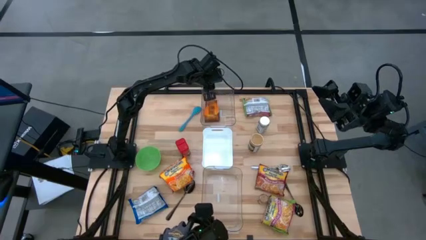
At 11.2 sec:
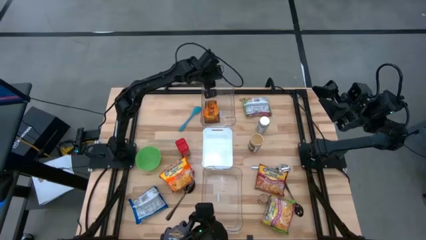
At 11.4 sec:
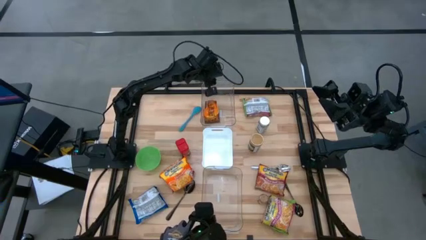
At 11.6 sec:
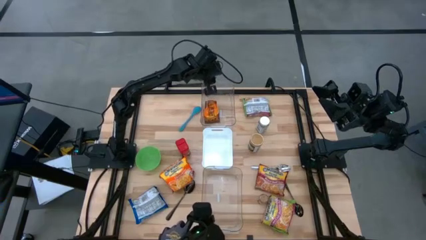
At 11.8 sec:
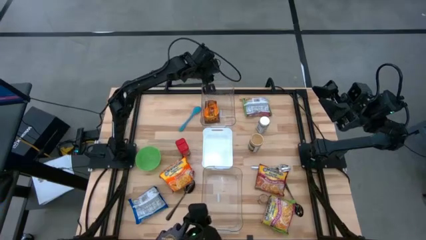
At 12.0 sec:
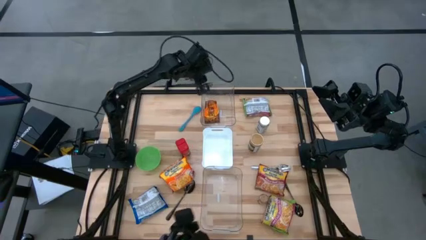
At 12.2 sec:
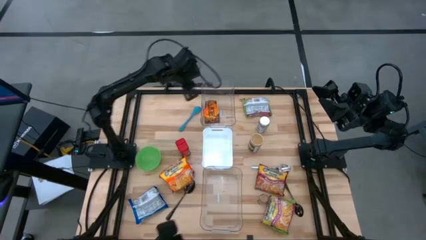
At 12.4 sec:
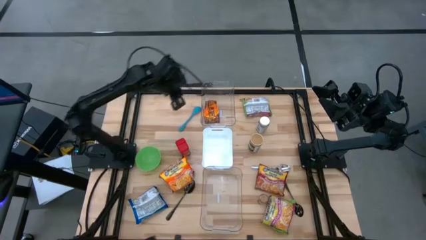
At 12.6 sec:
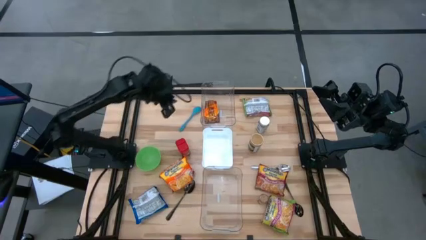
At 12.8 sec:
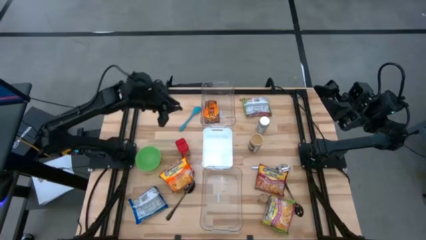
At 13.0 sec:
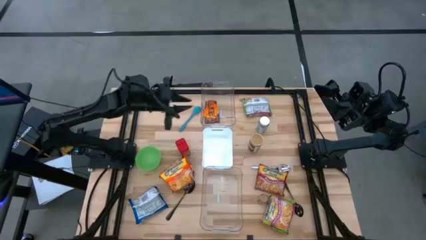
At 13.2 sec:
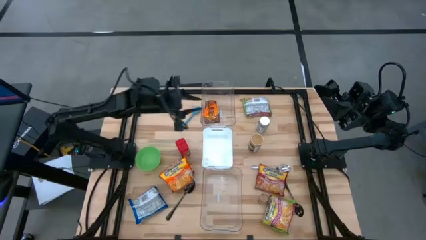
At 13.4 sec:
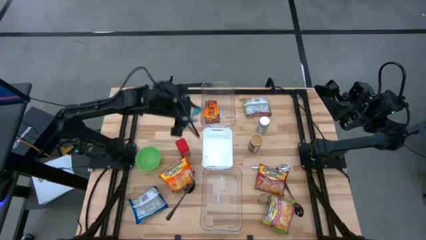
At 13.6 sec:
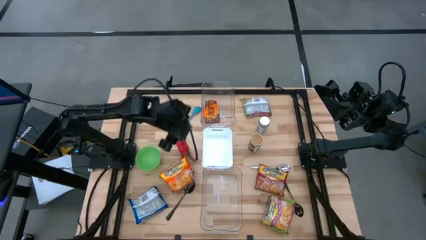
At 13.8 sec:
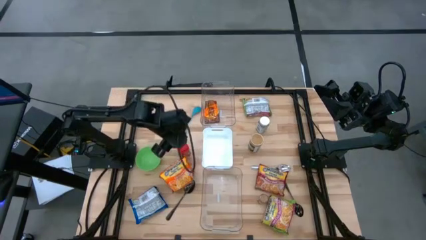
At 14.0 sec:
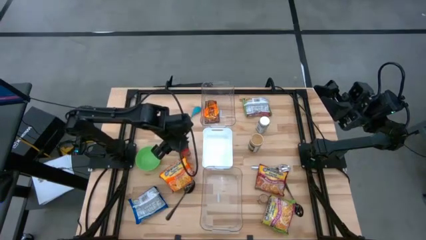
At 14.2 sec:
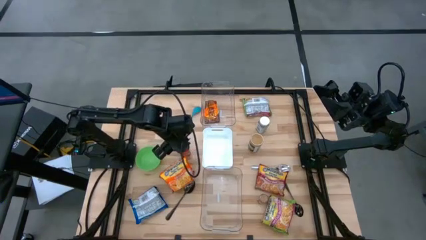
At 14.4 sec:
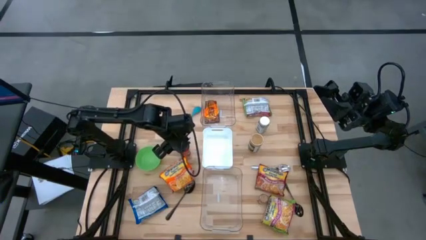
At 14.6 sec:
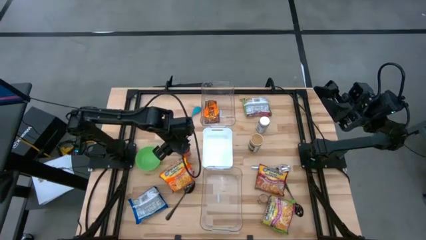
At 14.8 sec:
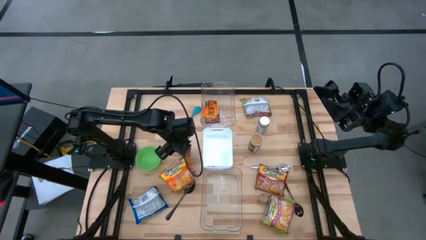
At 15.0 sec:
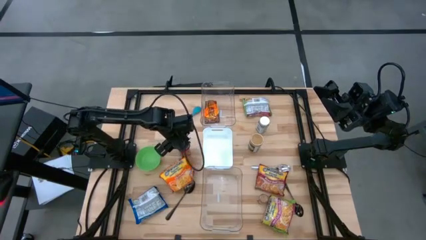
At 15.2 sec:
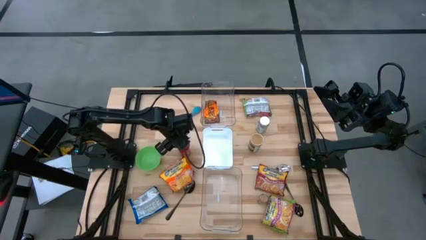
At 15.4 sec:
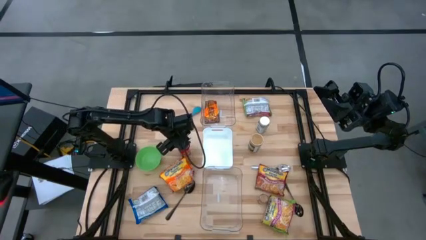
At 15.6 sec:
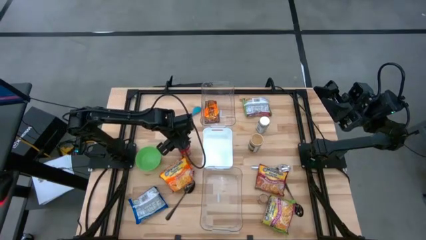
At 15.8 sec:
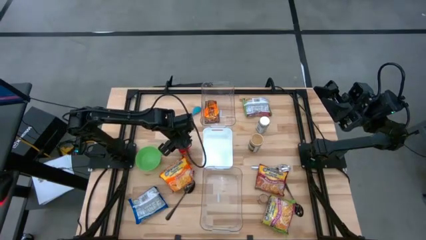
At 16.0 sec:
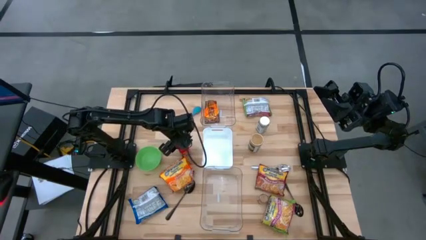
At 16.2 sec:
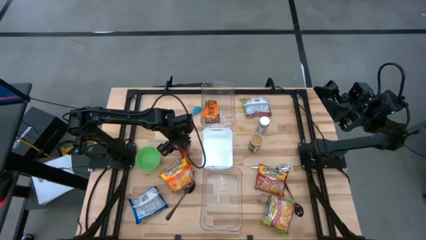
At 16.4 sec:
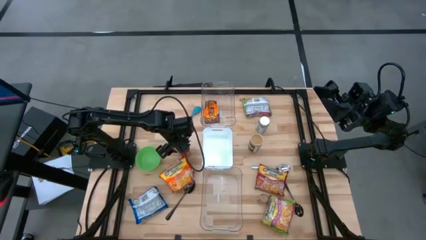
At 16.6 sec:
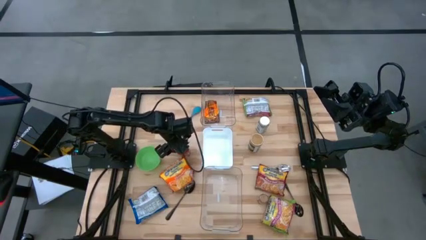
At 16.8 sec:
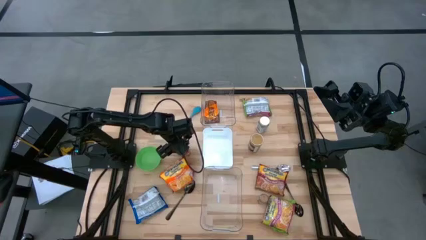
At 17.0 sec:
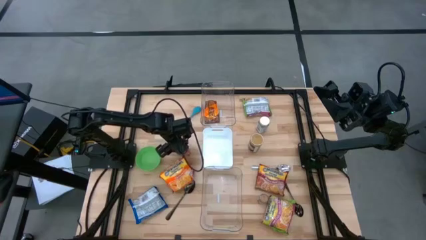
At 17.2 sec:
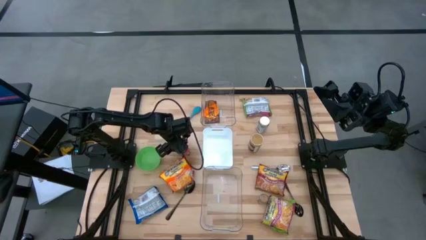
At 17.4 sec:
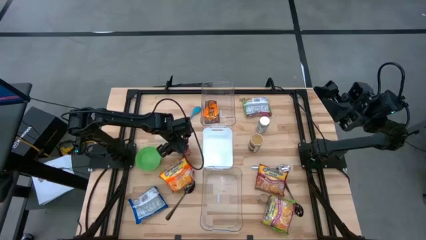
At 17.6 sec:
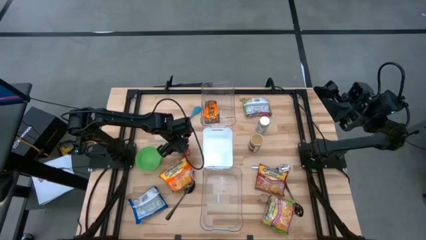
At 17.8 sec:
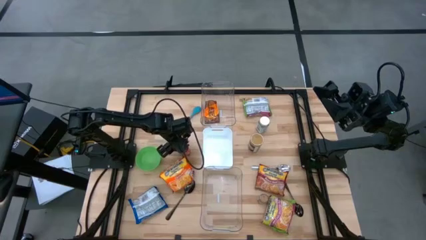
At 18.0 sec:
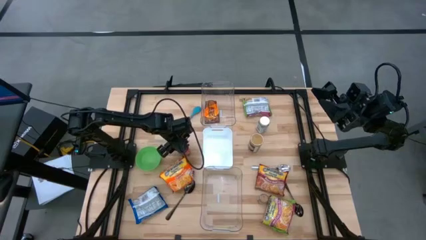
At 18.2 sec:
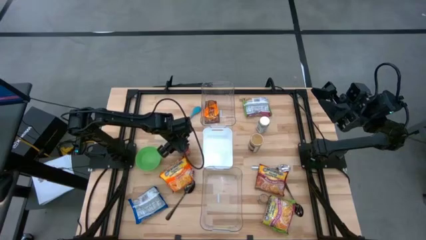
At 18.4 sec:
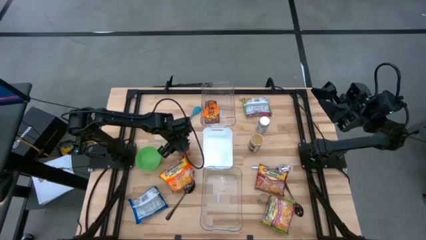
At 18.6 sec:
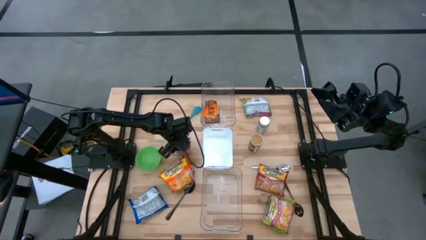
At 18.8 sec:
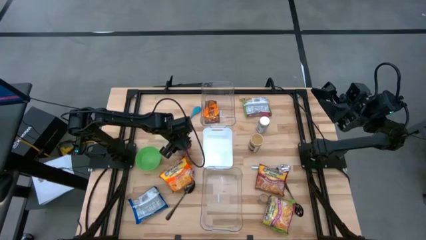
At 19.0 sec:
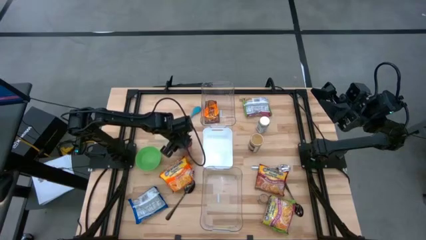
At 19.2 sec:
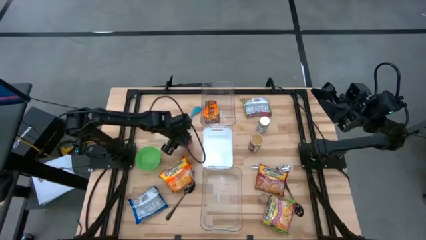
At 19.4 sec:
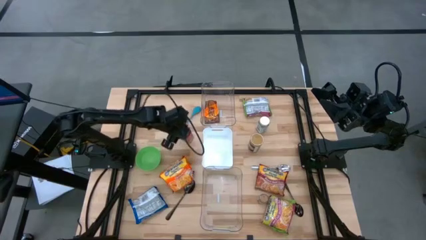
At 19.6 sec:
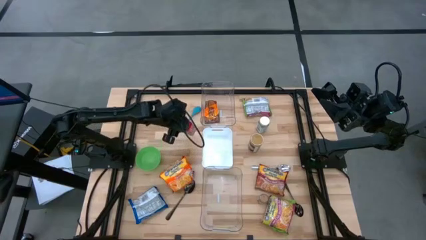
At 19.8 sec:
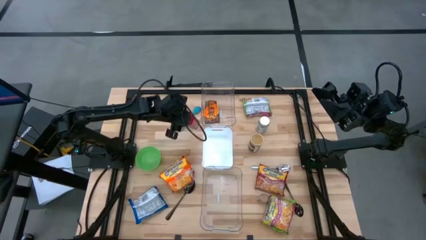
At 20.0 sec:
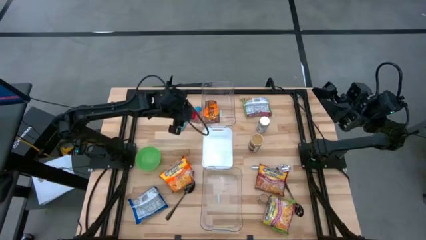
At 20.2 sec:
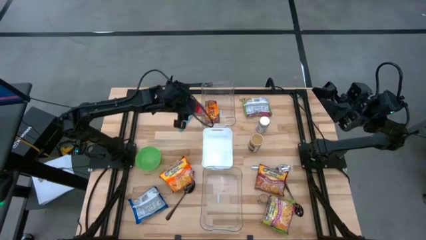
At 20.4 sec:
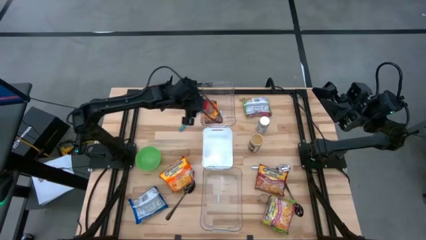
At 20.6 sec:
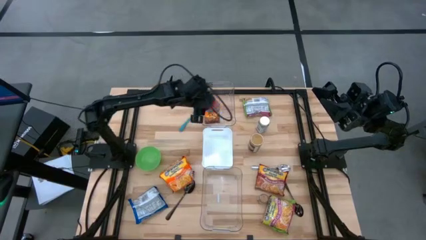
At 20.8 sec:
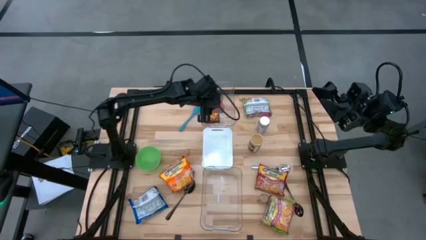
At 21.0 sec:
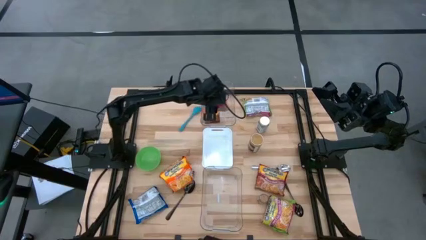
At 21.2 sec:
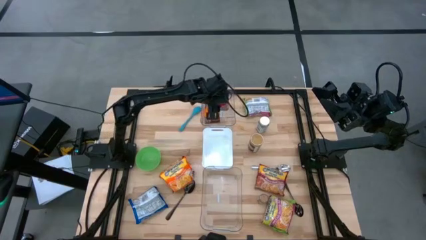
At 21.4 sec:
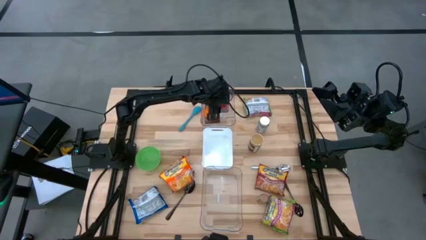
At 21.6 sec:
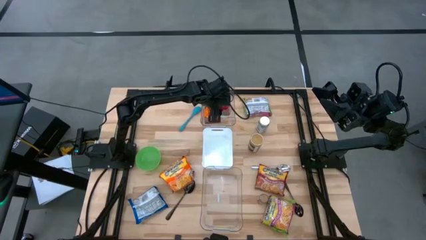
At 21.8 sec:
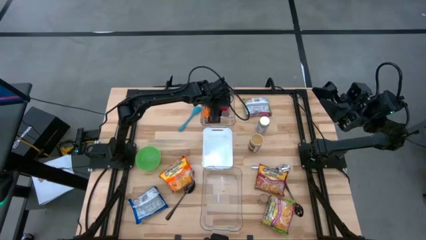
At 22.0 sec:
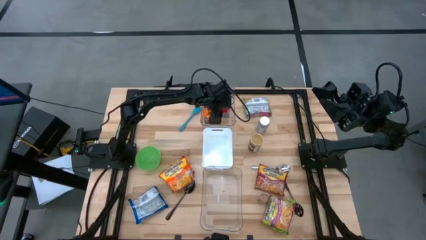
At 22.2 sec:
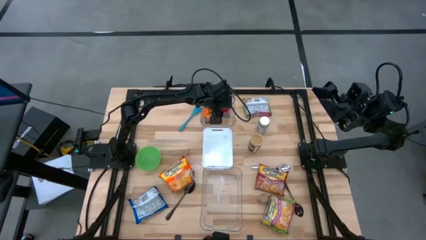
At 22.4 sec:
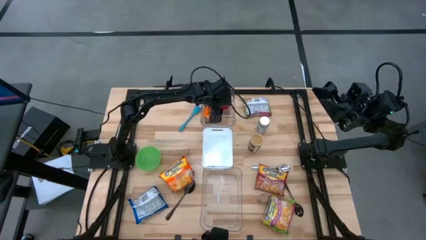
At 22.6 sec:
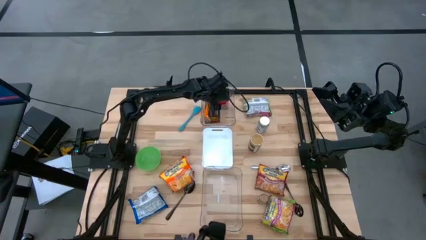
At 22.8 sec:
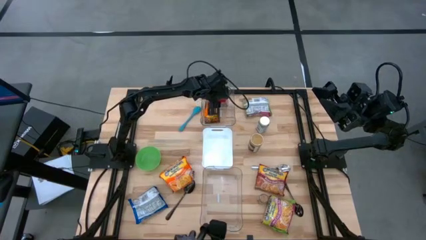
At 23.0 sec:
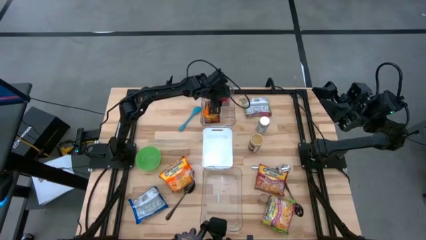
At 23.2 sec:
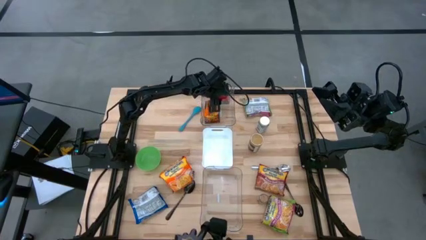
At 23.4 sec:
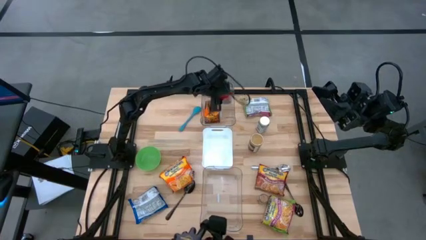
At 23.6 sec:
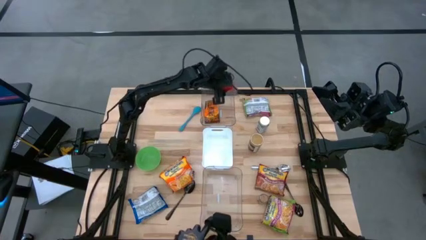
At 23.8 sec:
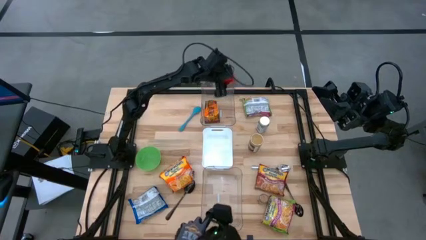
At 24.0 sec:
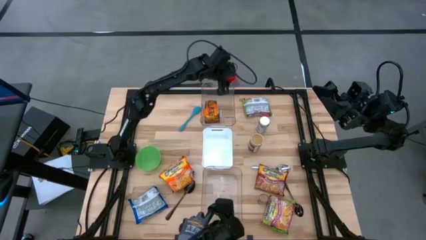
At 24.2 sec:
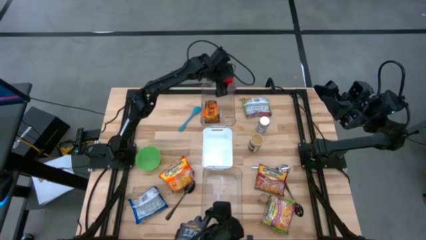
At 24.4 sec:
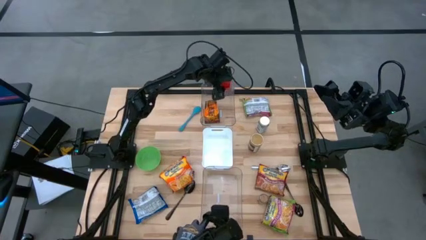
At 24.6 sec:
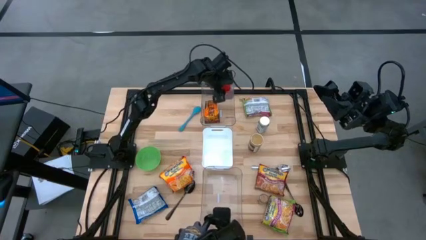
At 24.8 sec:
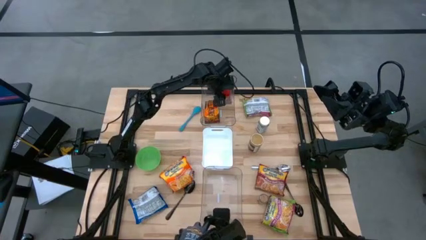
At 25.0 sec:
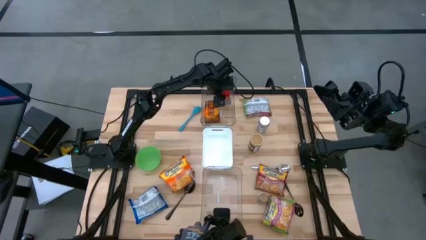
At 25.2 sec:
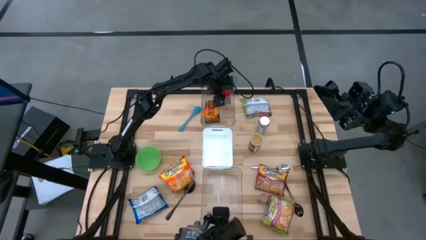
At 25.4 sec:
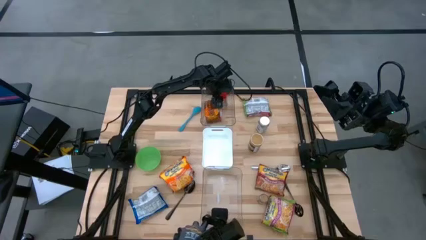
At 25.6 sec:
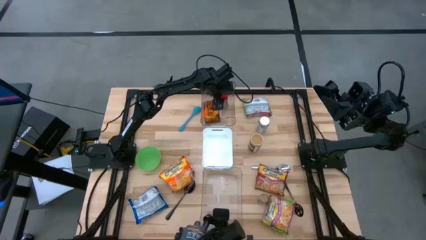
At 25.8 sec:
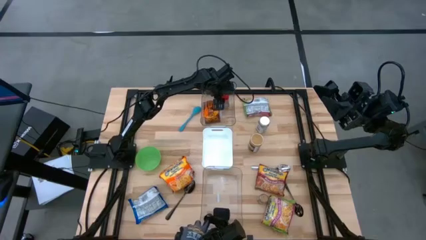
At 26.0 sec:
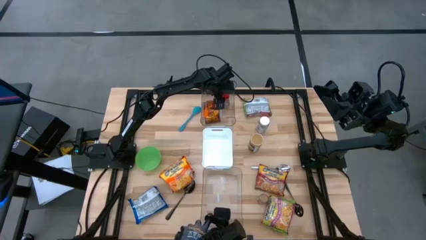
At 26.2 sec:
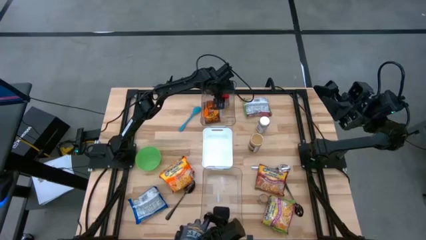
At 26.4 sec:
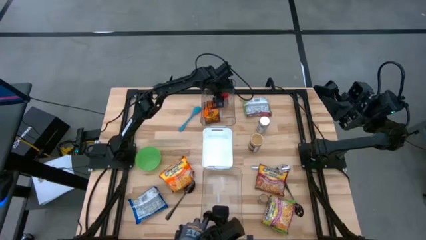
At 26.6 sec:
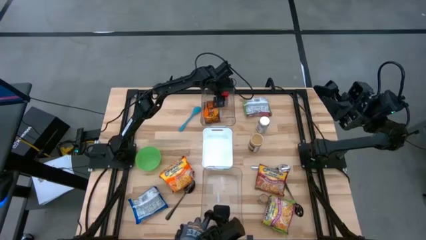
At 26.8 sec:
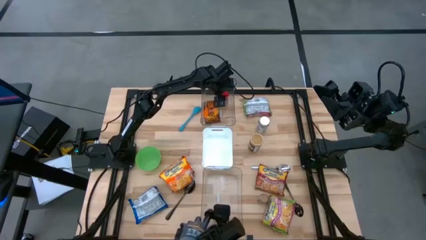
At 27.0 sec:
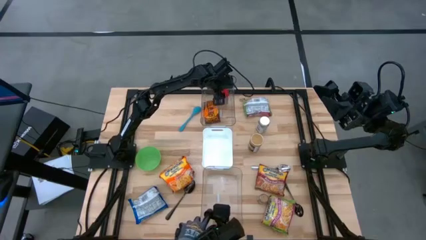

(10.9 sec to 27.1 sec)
Task: Pick & Place Food Item
Put the red seasoning can into the top transparent bin
